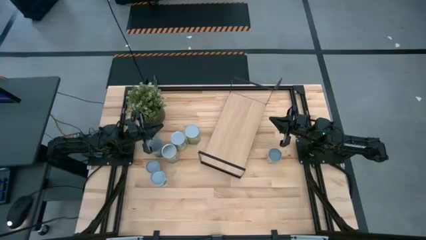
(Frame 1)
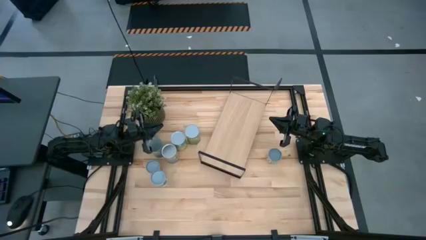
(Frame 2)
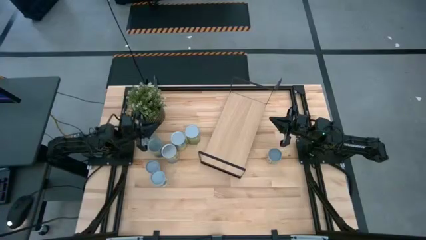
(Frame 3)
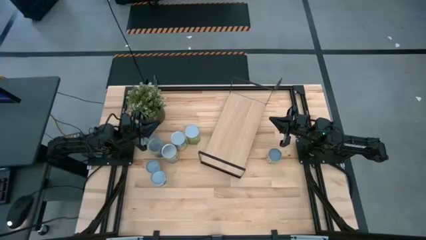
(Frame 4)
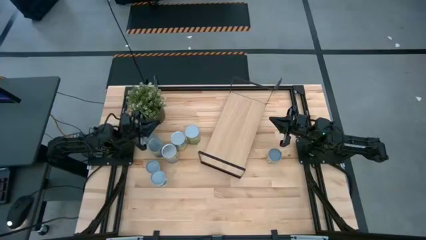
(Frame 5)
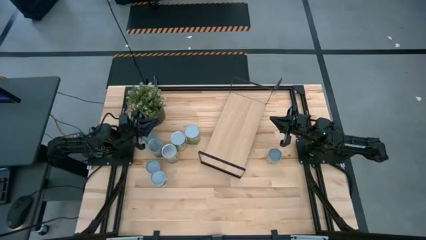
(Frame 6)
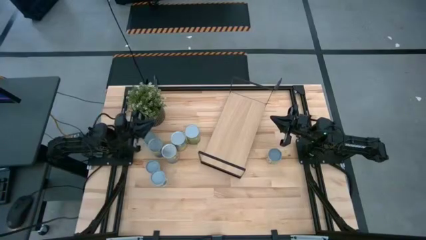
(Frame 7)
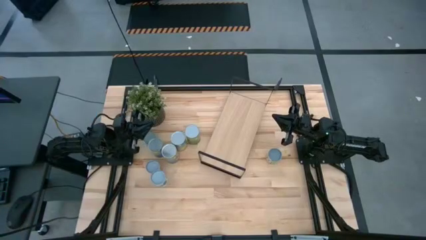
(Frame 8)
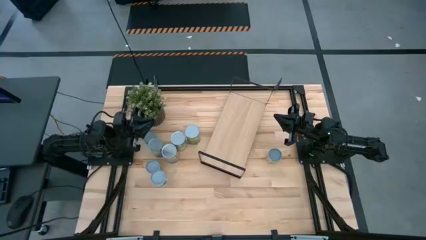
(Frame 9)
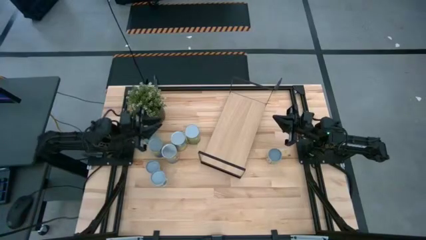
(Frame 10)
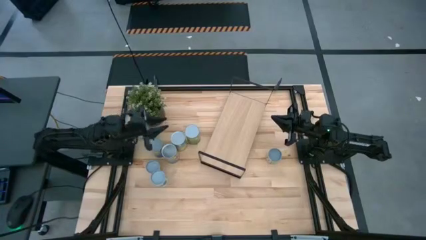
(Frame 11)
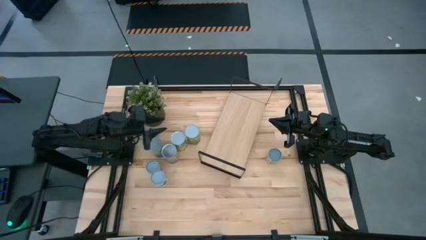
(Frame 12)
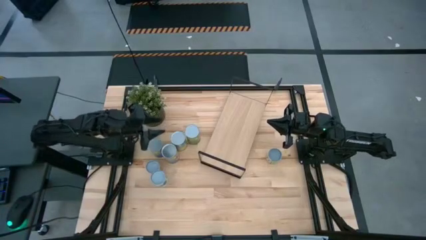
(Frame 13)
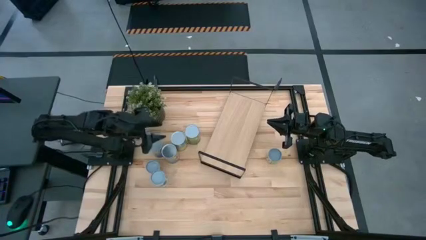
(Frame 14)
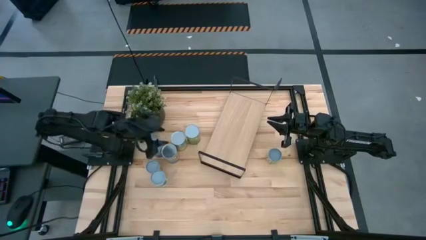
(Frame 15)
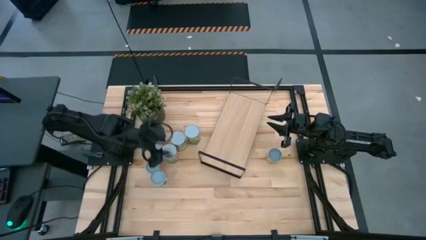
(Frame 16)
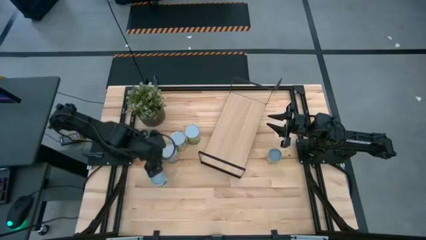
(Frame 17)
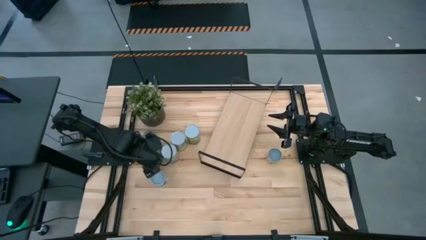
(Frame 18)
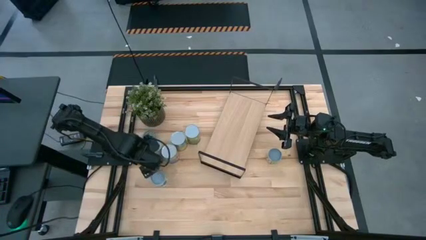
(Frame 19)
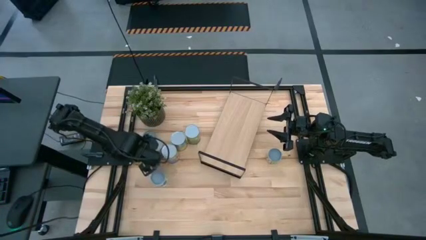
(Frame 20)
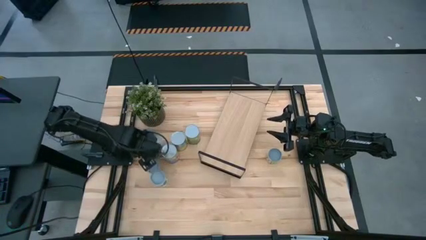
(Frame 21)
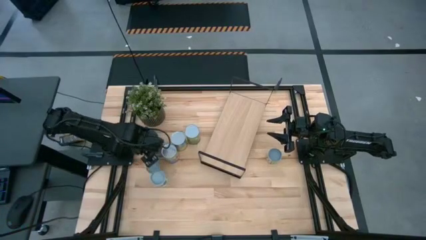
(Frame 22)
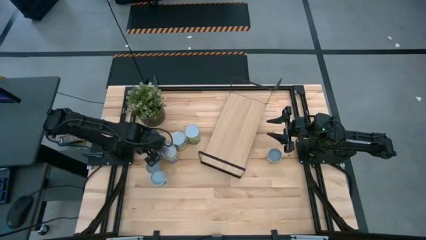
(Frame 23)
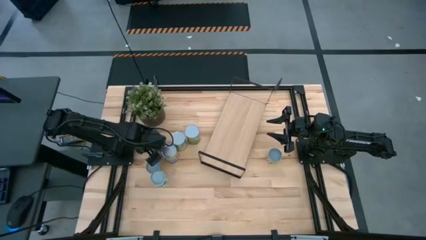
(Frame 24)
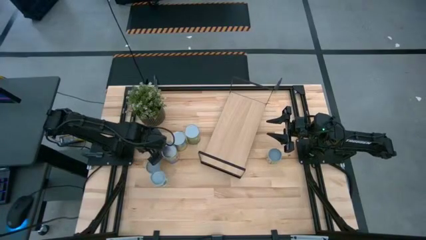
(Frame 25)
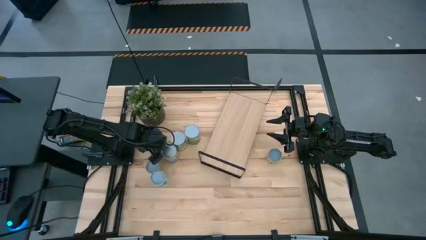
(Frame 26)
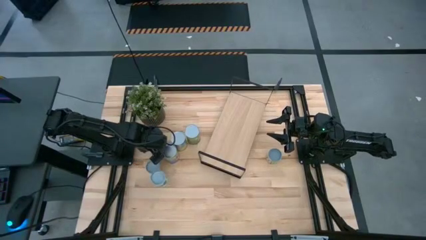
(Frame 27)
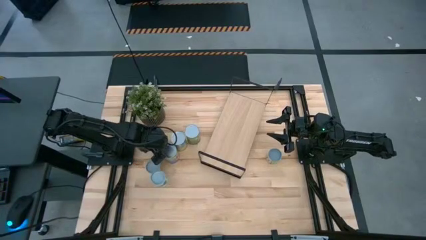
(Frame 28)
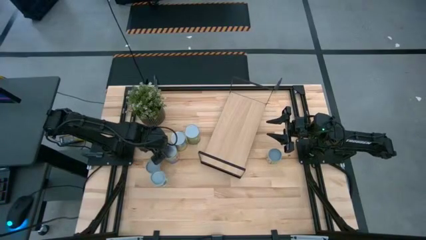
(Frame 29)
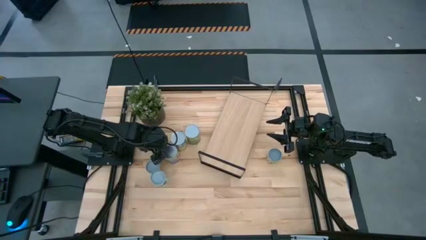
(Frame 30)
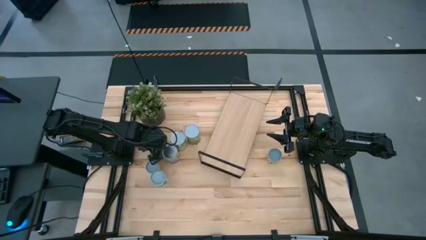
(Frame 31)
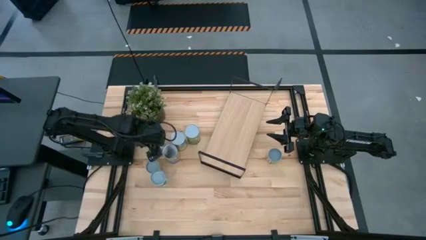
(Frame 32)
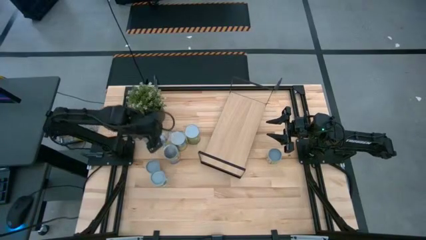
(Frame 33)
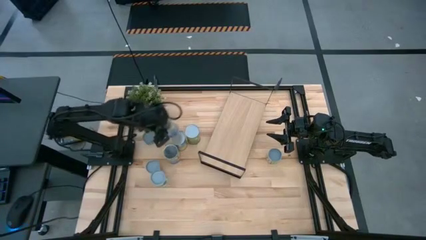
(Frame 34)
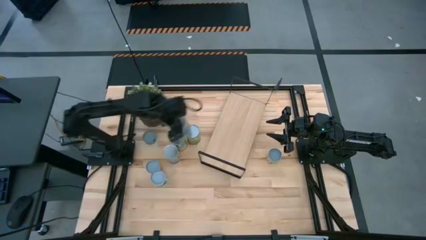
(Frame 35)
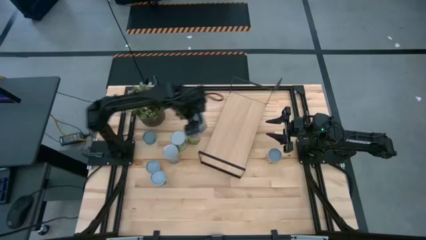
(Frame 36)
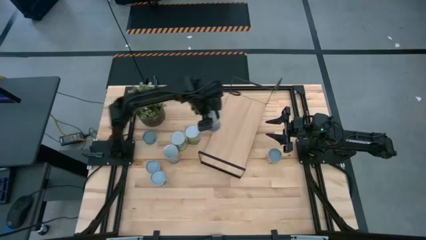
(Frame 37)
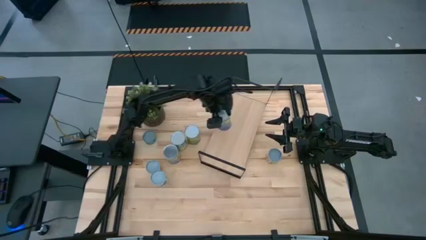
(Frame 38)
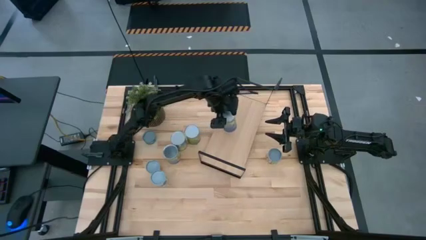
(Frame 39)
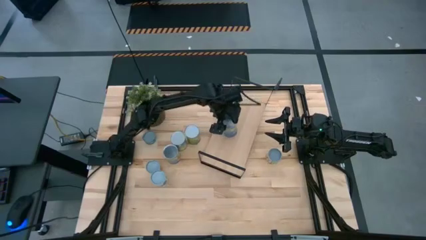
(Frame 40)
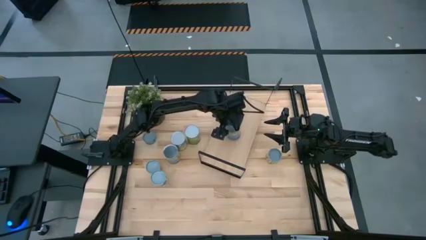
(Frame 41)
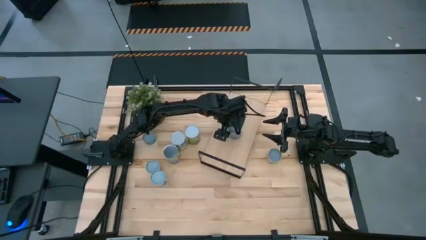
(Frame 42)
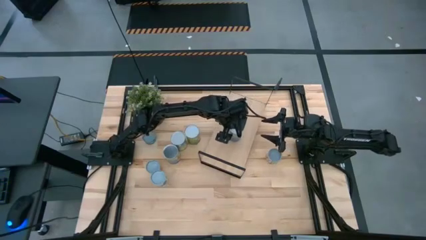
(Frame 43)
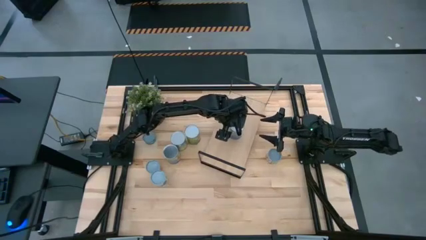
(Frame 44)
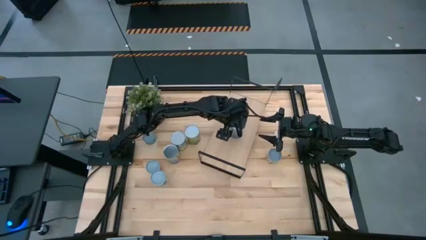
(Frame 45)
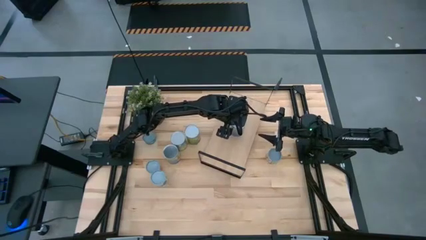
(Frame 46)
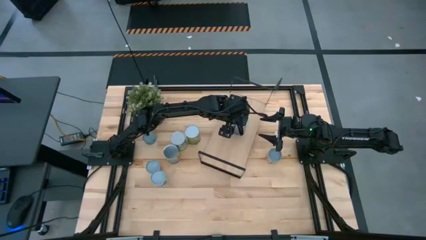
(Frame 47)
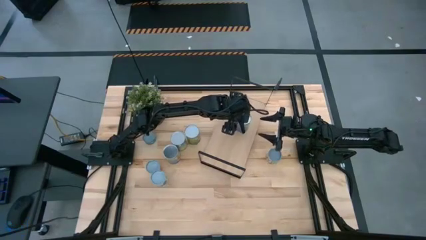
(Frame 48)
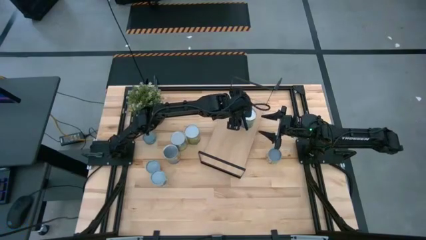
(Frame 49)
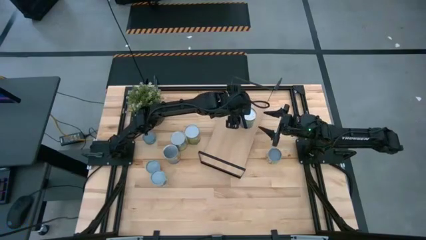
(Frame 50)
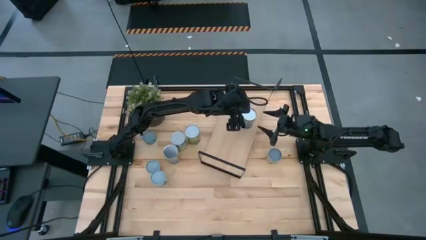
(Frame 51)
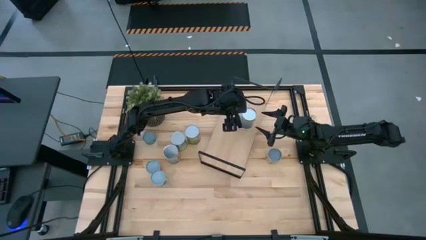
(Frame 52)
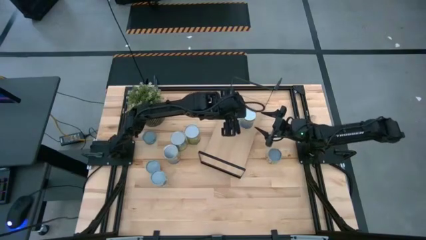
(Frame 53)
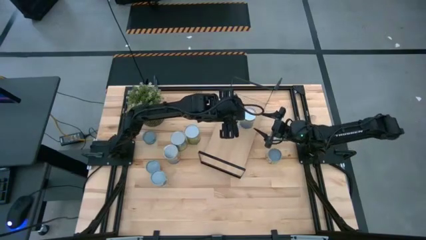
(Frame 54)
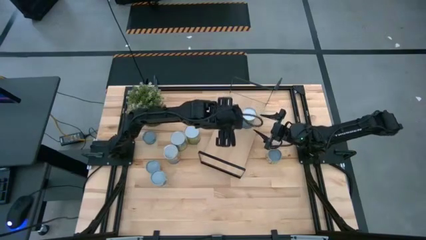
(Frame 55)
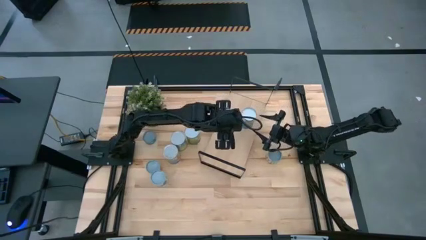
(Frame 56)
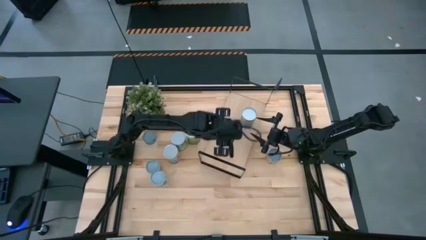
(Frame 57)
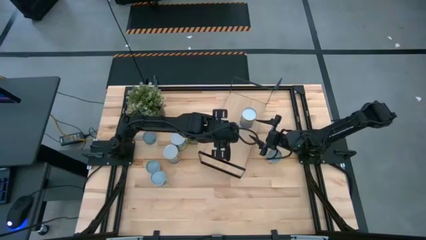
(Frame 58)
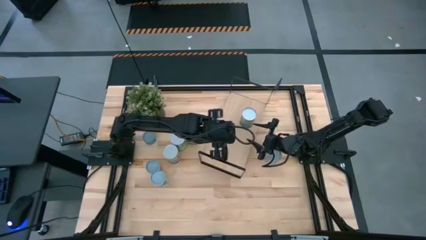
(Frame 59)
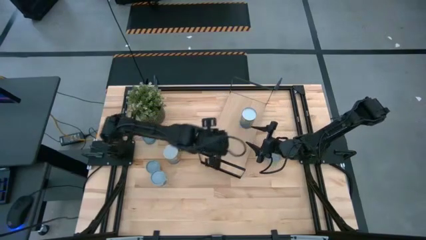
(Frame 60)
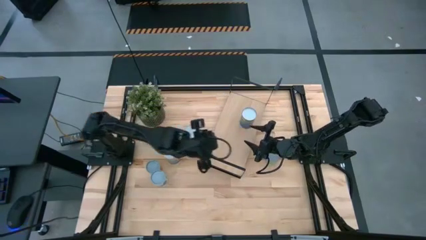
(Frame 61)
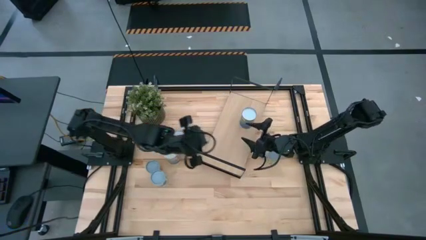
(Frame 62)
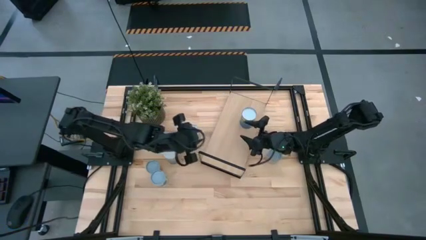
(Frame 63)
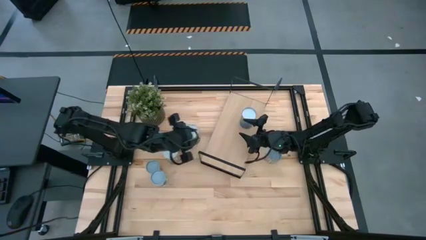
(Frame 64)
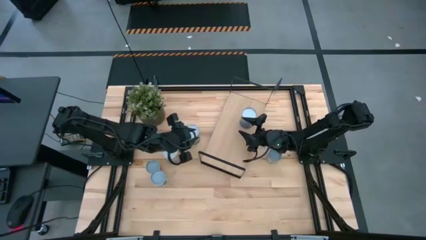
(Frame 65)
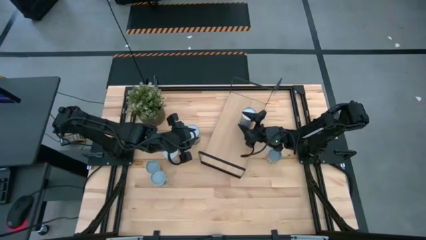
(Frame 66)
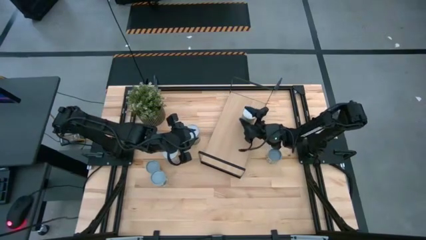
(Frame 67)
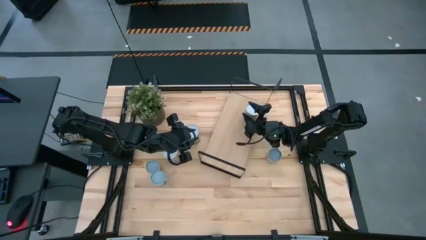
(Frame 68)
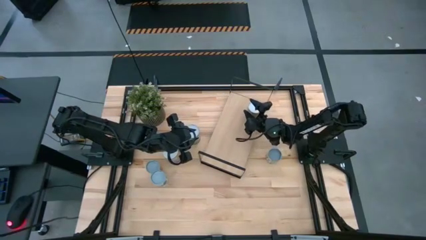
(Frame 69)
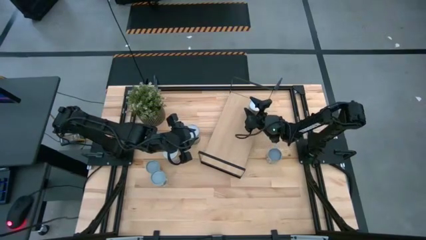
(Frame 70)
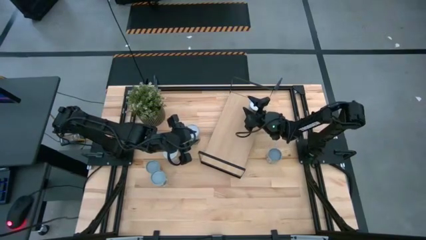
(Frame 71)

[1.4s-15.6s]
Task: Pick and place cans onto a shelf
Put the canned peas on the shelf
